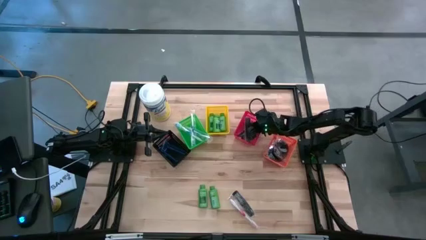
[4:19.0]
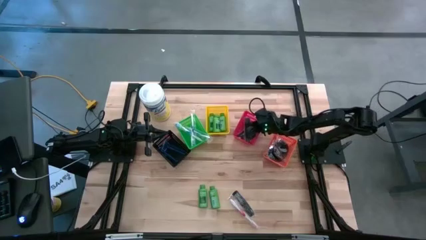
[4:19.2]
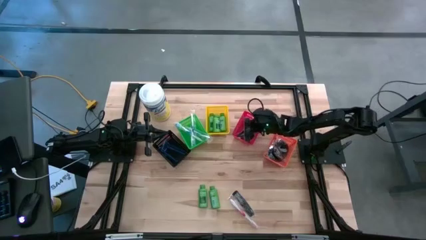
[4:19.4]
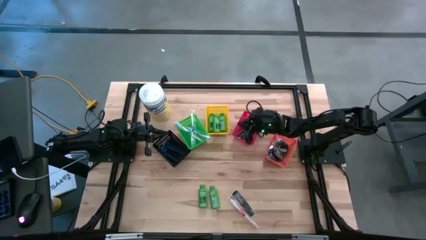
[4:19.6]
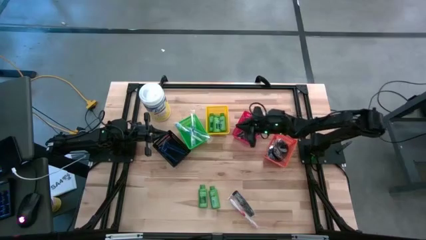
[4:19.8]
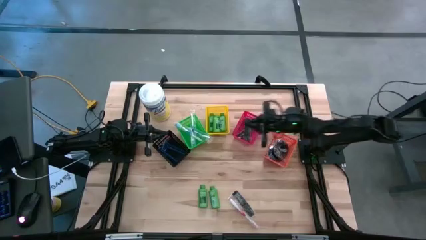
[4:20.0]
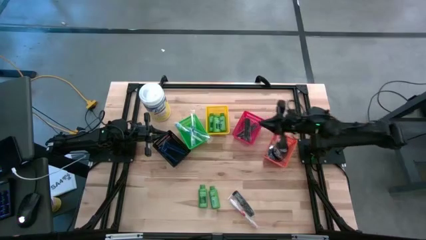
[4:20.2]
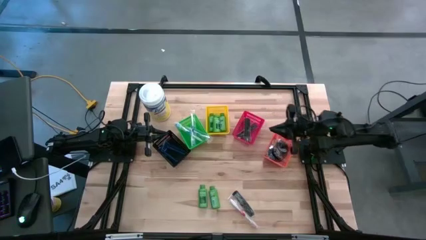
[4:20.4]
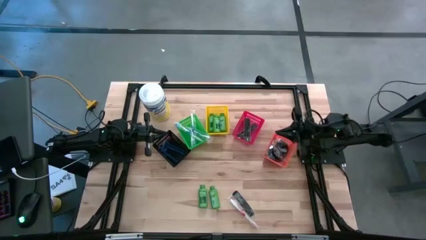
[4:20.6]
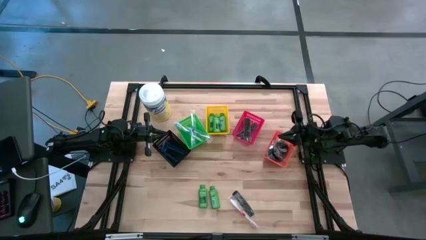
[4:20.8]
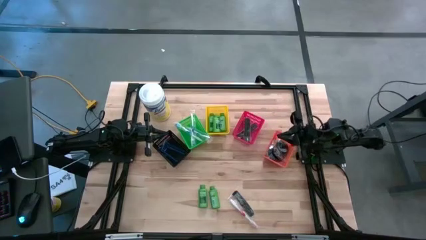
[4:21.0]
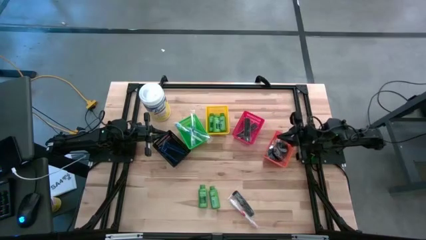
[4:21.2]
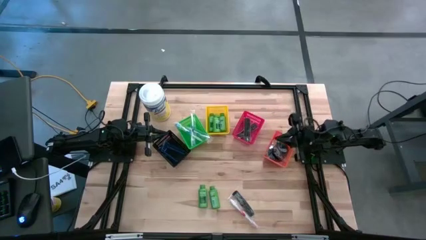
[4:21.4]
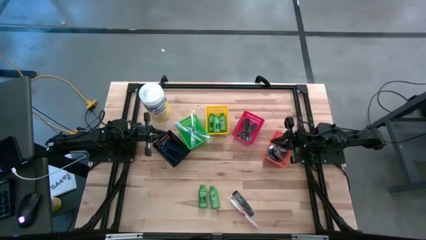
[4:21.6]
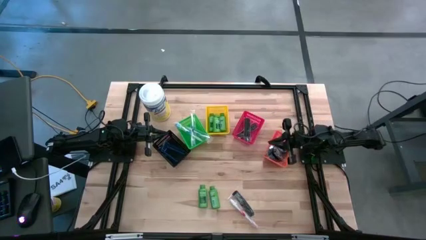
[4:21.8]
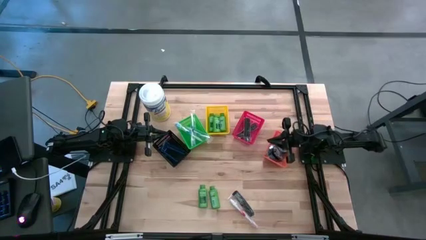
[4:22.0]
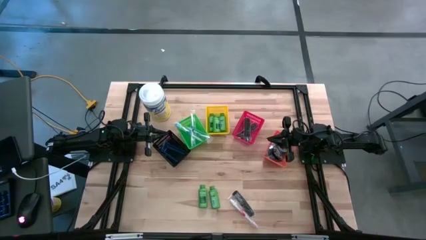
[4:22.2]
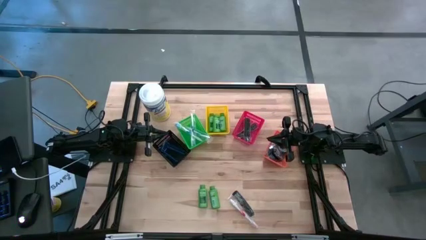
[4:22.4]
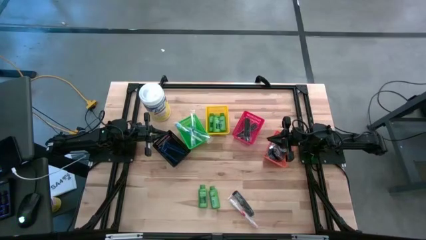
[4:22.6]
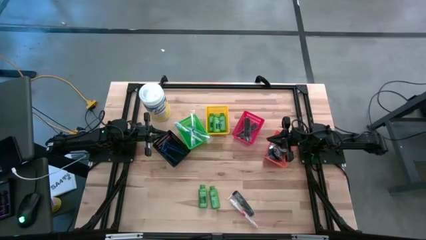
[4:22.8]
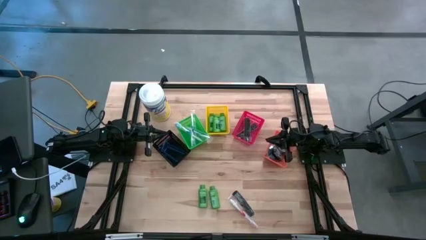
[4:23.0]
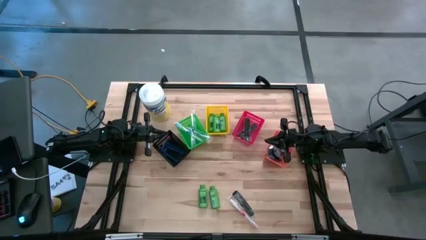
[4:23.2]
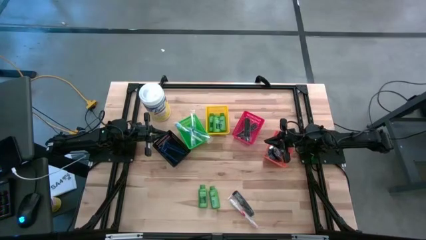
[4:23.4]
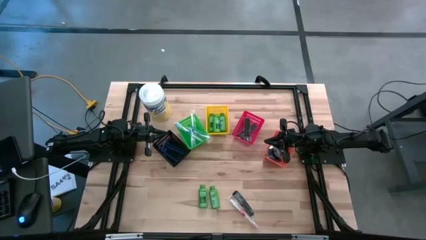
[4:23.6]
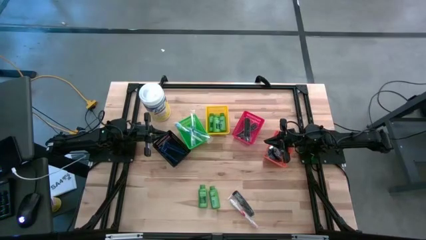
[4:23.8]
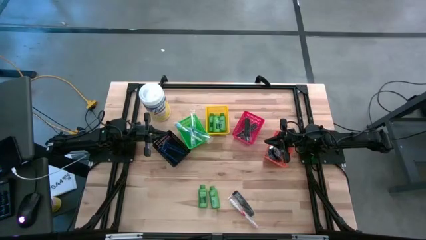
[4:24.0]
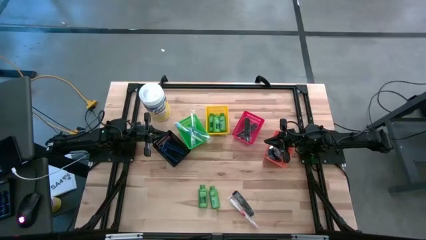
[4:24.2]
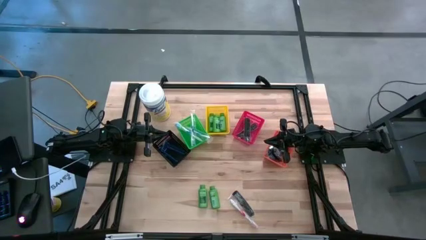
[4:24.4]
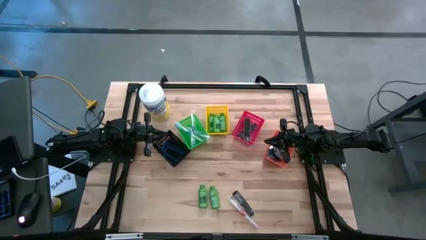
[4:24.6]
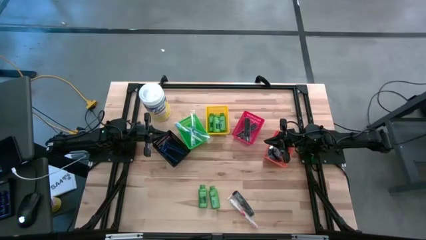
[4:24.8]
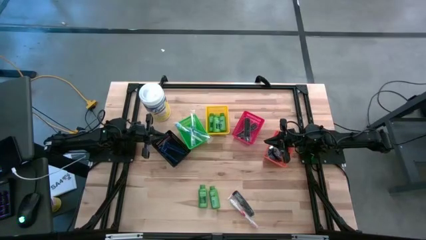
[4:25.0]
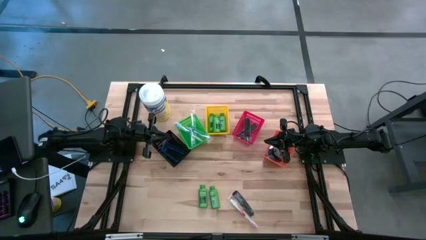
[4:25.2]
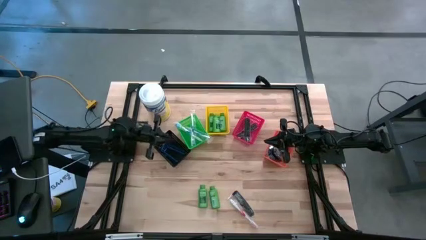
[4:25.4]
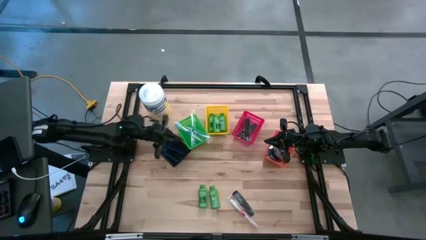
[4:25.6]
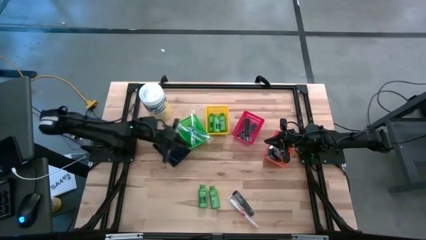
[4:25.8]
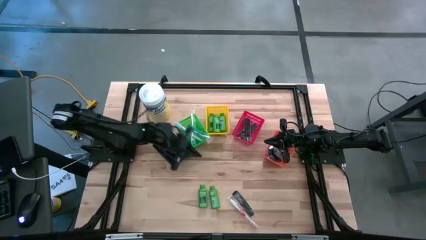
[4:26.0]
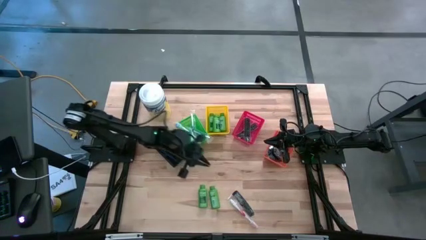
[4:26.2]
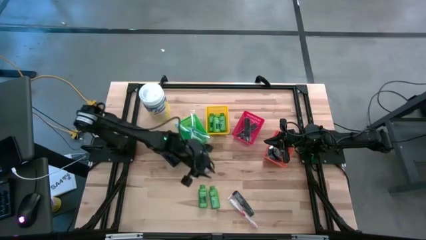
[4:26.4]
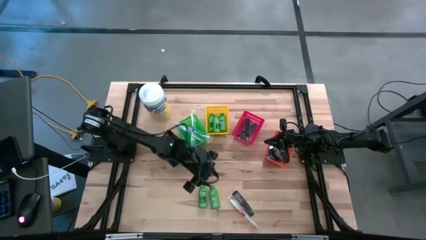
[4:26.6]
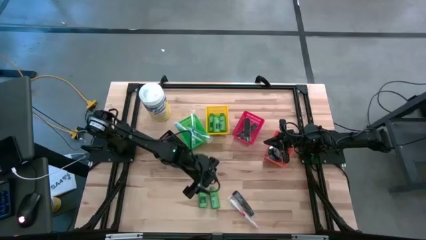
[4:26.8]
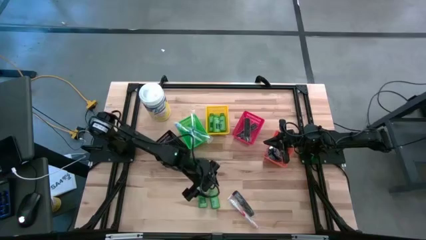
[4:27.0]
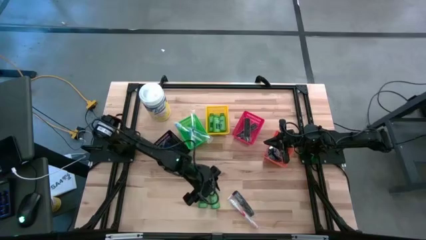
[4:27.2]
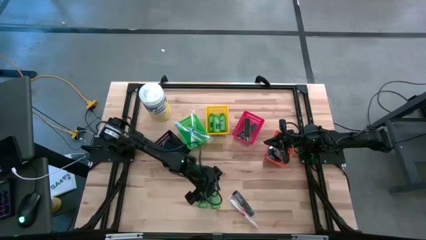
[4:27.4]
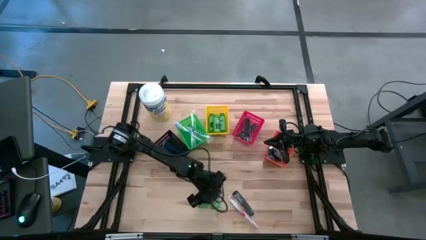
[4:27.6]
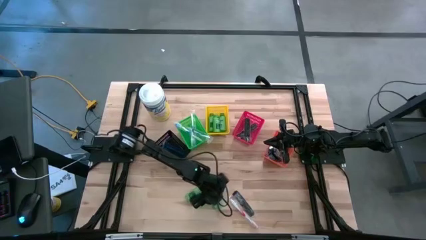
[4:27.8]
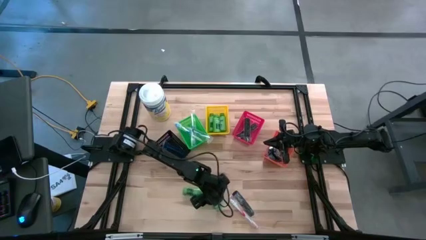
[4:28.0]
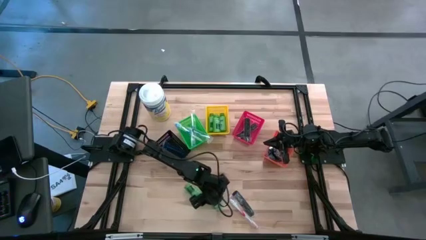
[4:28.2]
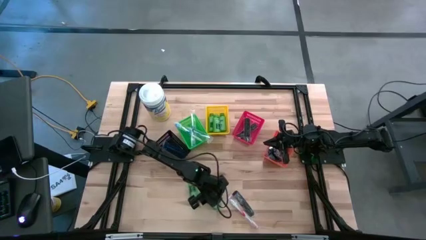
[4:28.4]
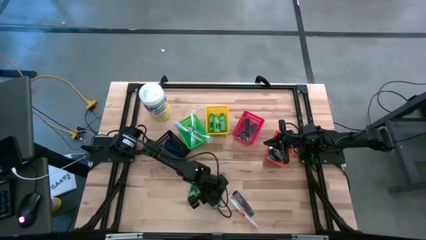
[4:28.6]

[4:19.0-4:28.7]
Task: Pick & Place Travel size toiletries
Put the green shampoo bottle into the yellow bin

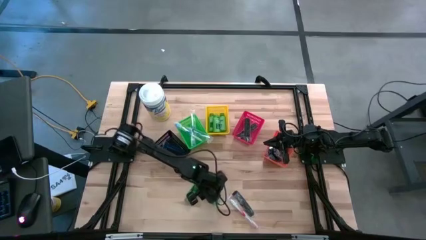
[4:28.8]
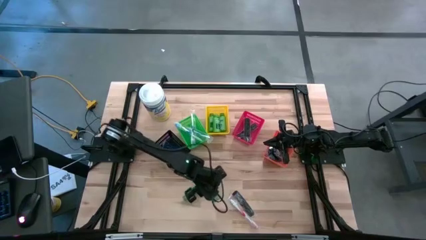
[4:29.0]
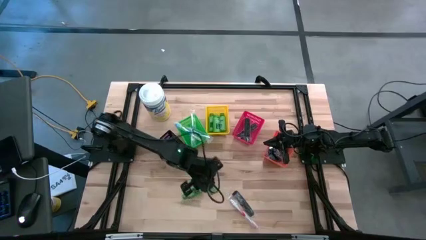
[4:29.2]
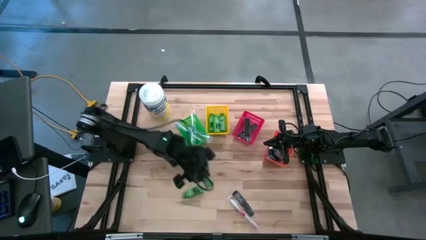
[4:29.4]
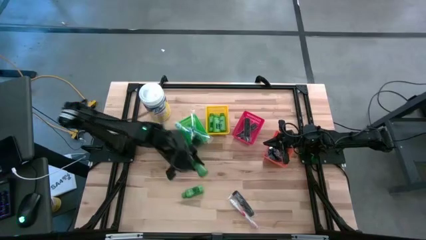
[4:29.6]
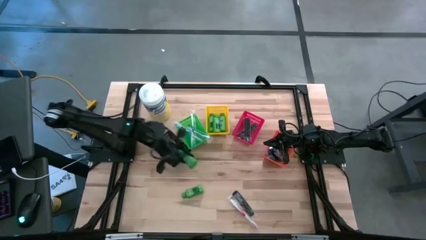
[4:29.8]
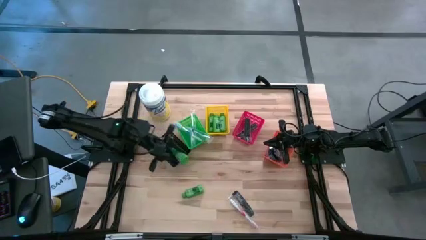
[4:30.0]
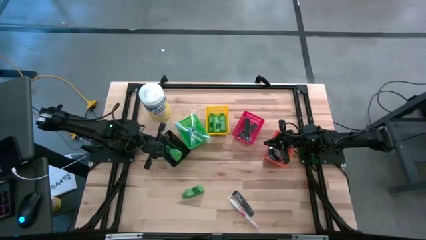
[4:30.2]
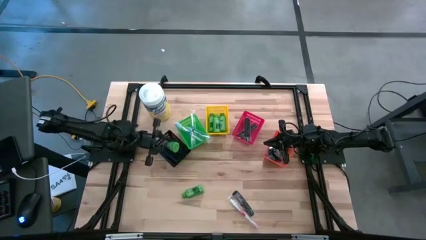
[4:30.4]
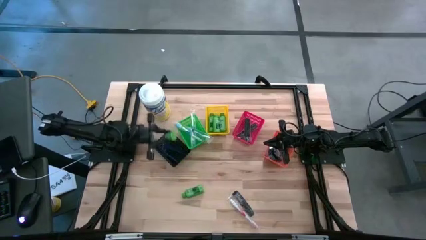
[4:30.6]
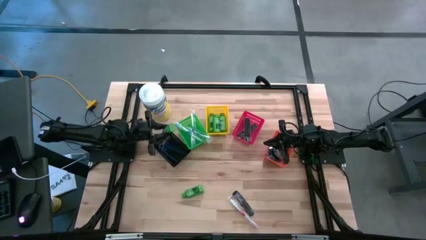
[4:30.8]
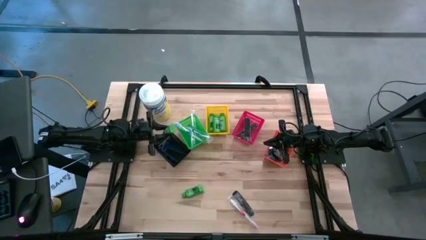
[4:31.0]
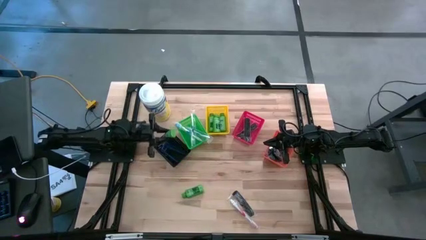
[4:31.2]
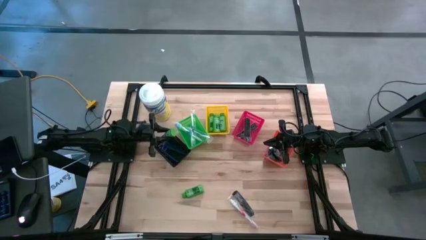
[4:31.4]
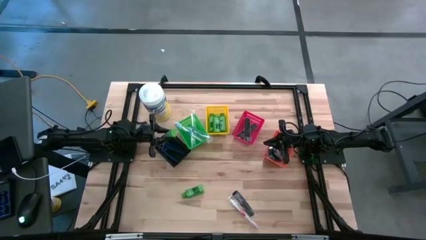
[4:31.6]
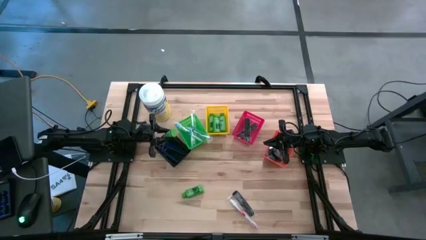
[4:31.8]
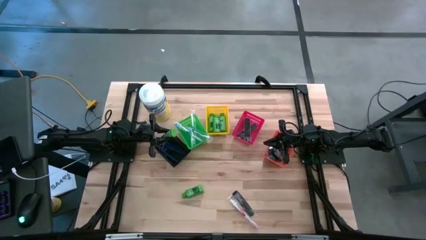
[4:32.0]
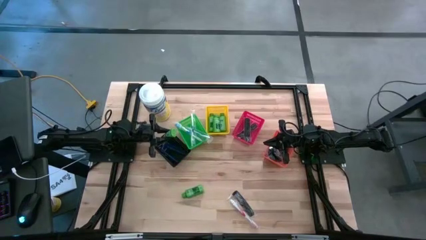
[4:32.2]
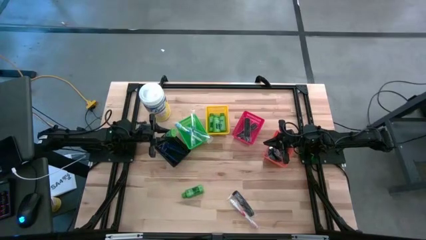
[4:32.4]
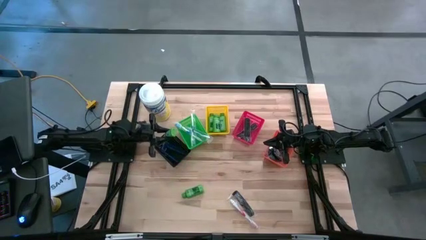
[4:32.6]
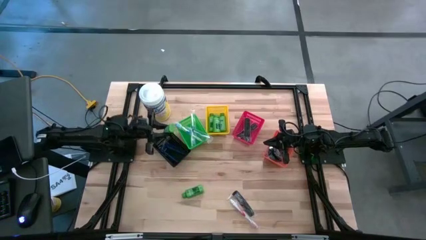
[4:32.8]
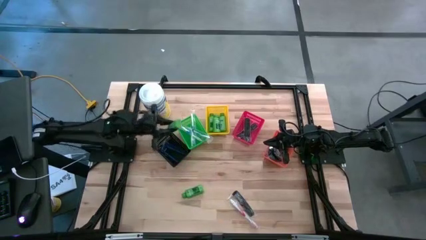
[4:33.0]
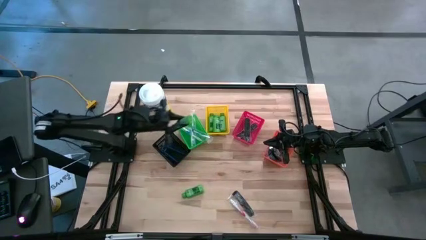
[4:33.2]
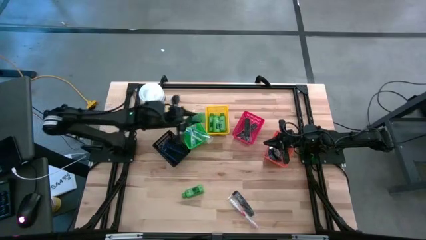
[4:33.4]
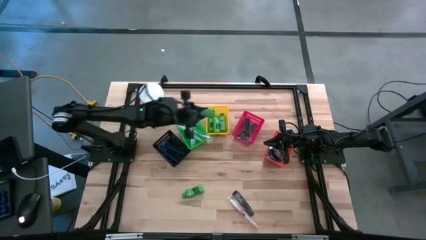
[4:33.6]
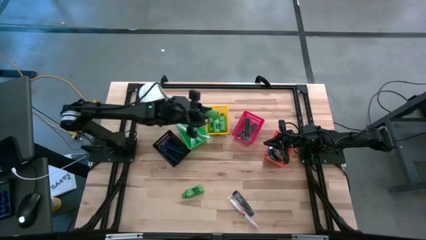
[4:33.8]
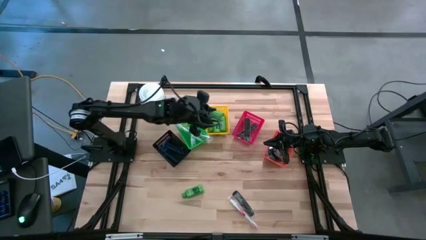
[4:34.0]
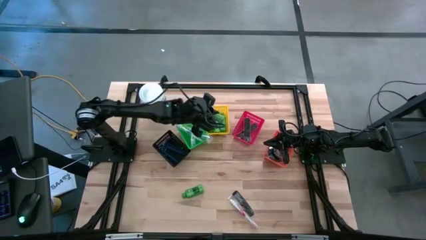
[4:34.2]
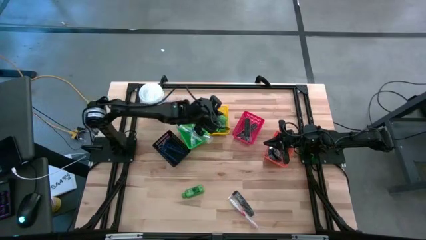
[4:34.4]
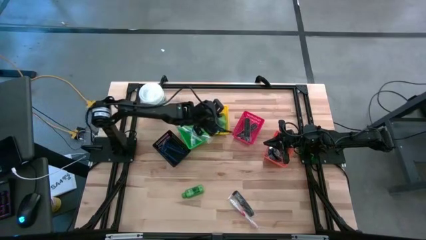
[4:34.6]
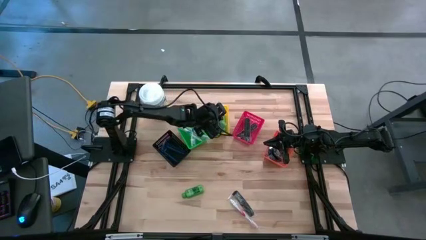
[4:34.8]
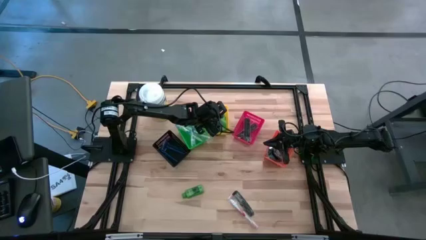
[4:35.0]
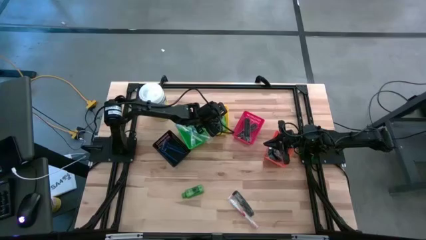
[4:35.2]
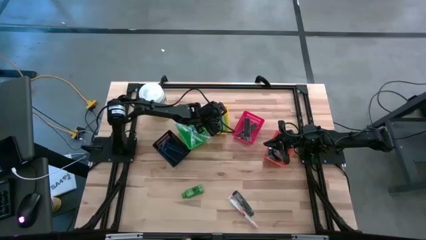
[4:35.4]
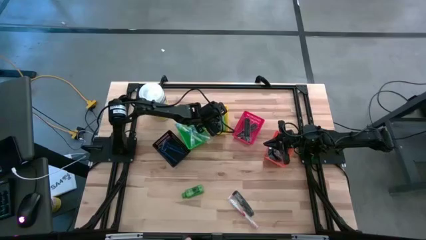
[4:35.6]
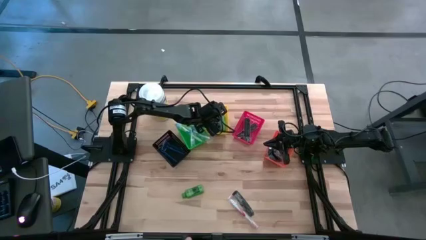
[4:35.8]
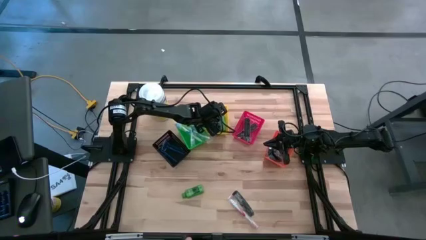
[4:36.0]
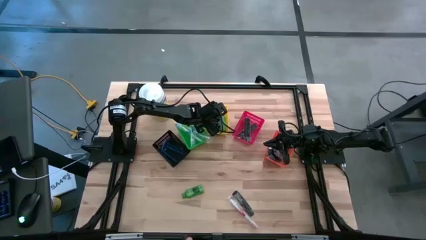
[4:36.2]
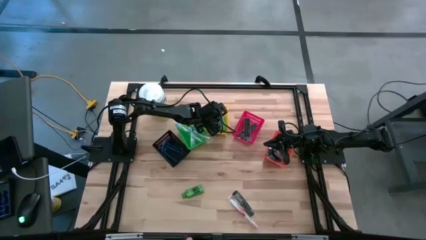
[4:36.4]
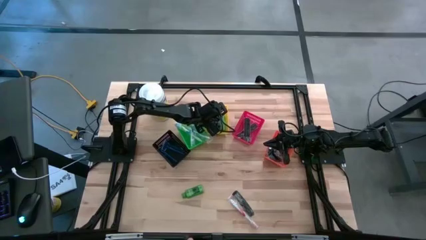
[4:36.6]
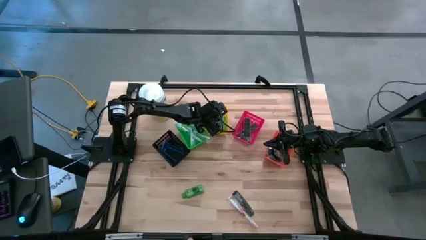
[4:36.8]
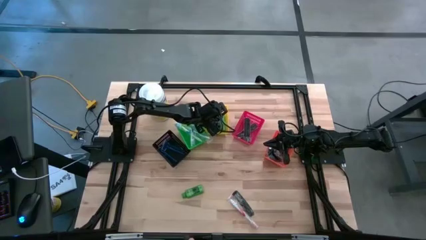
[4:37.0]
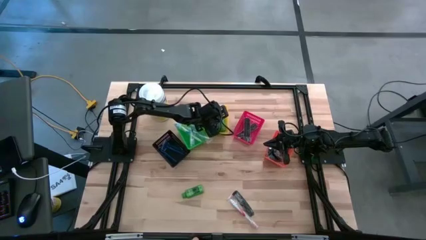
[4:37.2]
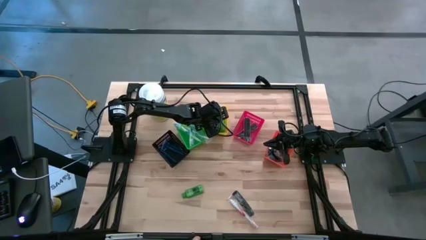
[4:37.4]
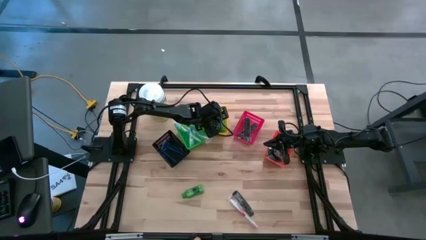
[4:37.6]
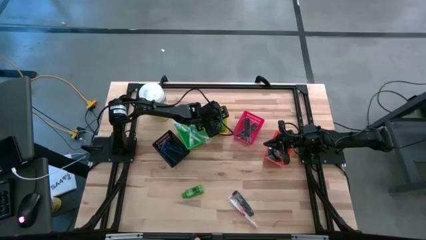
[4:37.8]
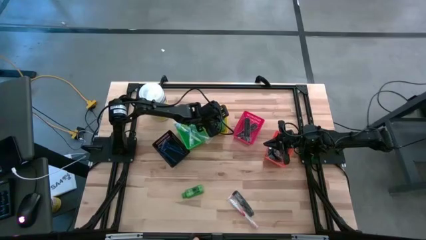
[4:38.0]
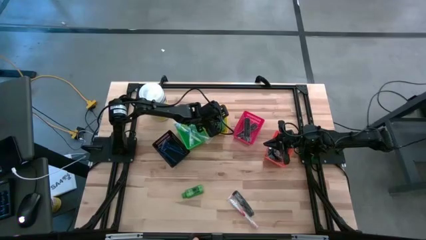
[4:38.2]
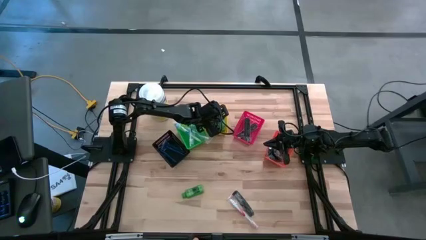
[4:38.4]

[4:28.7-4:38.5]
Put the green shampoo bottle into the yellow bin
